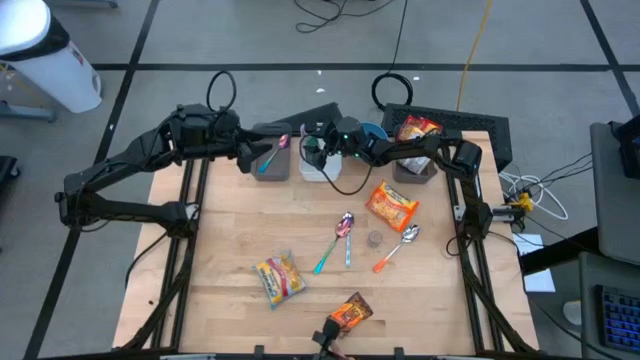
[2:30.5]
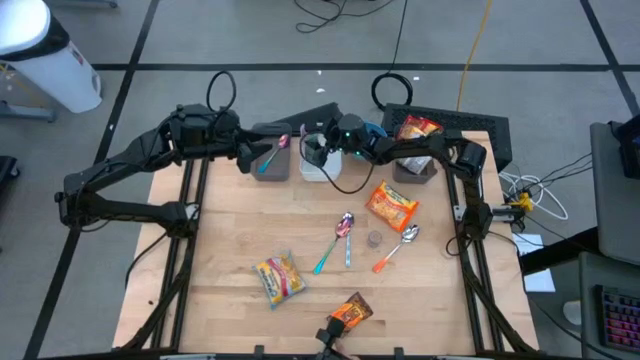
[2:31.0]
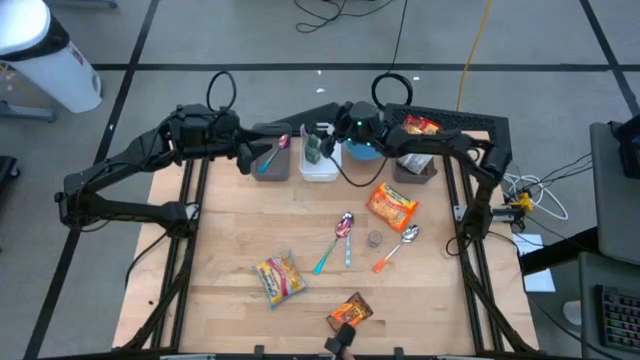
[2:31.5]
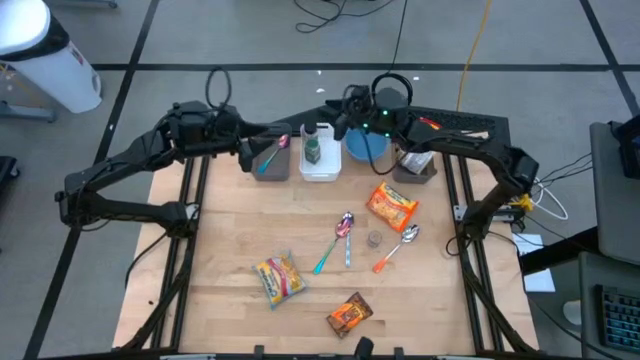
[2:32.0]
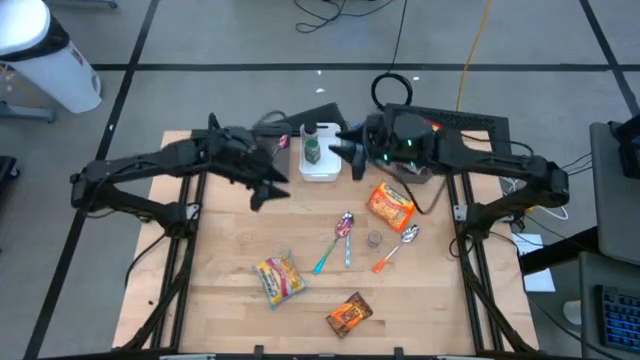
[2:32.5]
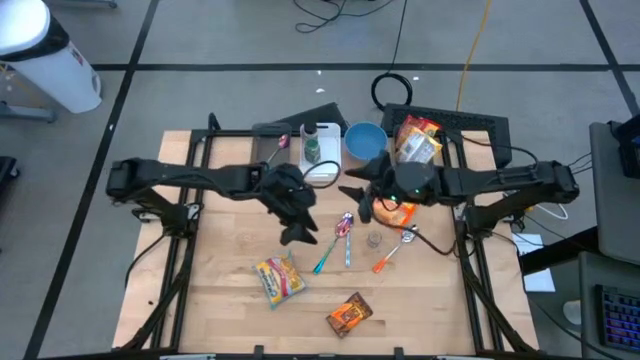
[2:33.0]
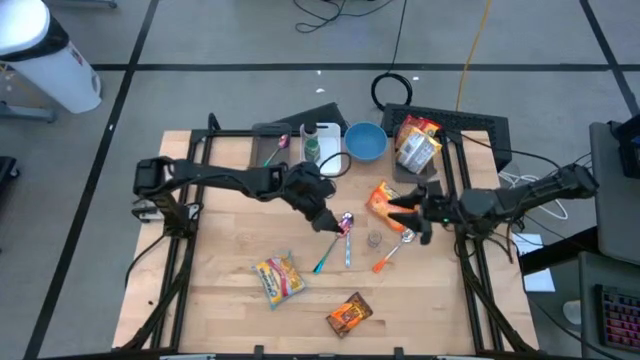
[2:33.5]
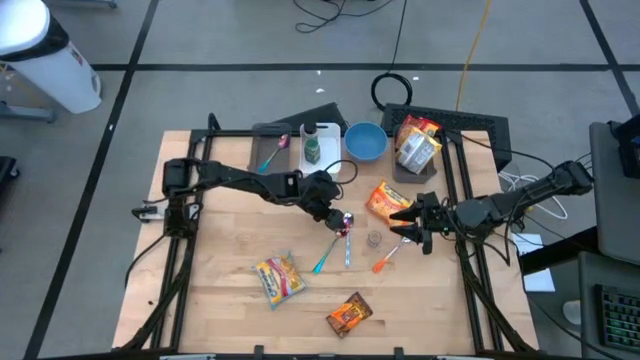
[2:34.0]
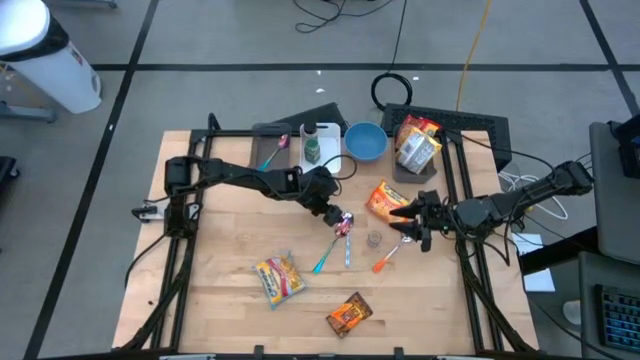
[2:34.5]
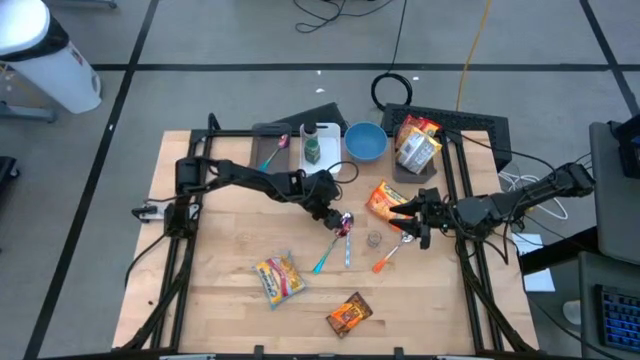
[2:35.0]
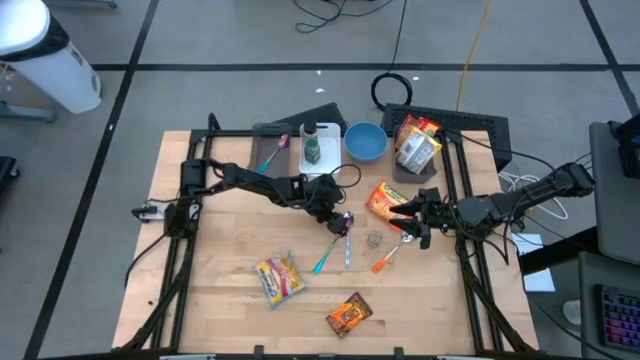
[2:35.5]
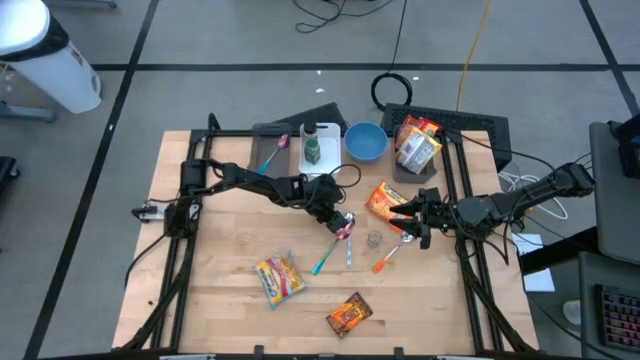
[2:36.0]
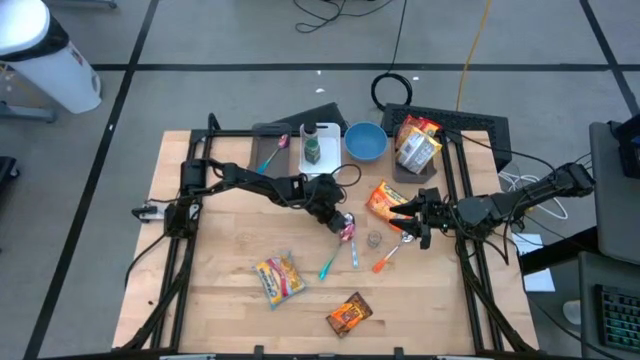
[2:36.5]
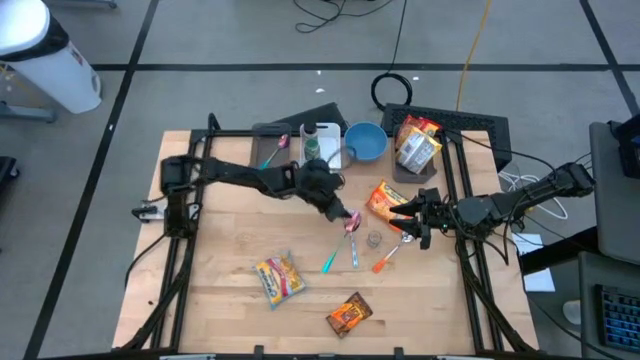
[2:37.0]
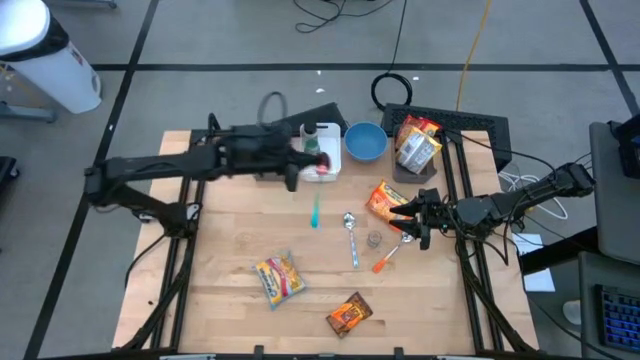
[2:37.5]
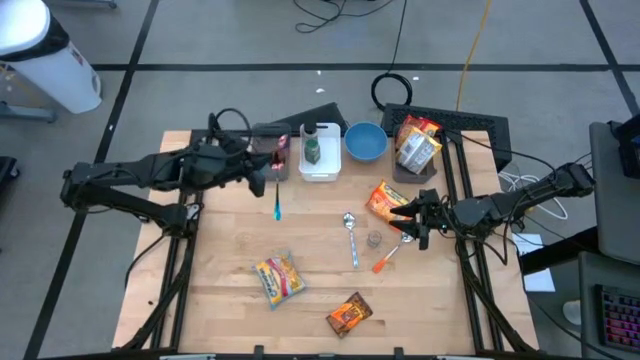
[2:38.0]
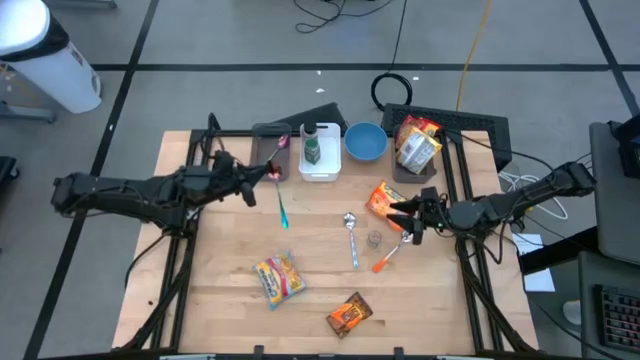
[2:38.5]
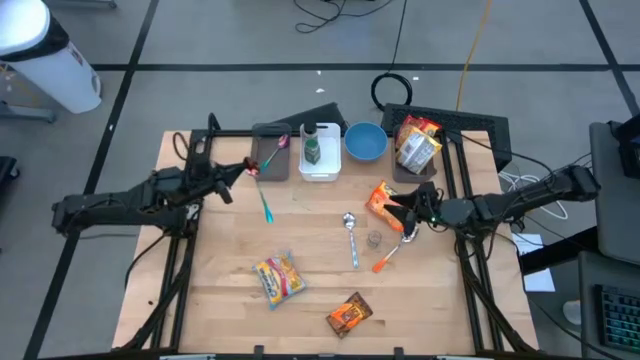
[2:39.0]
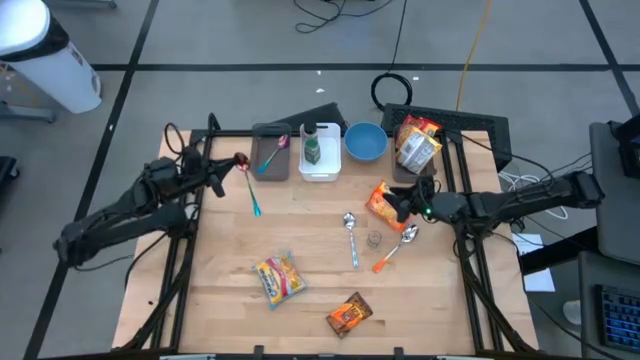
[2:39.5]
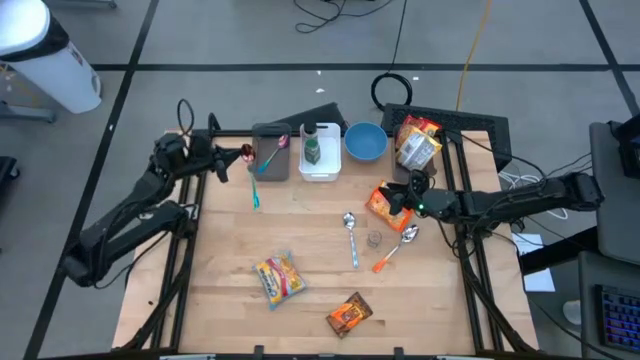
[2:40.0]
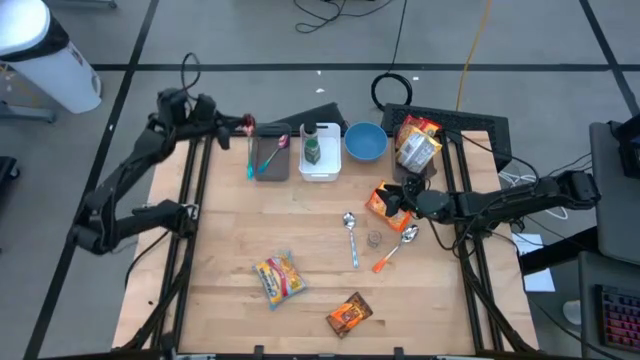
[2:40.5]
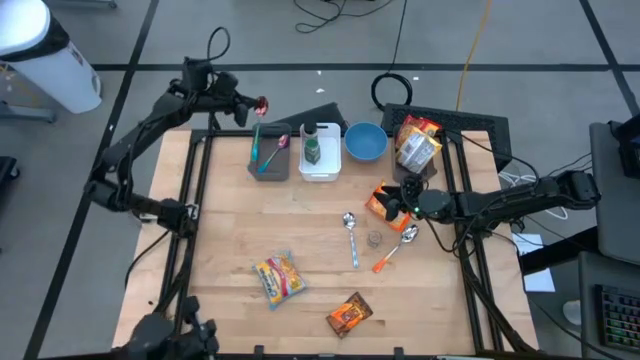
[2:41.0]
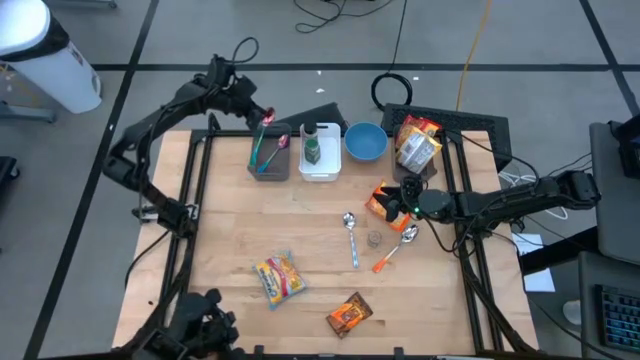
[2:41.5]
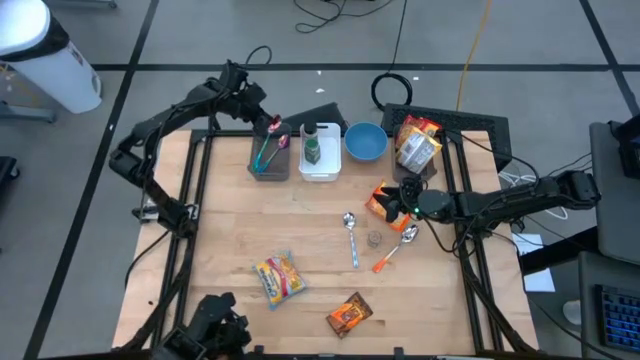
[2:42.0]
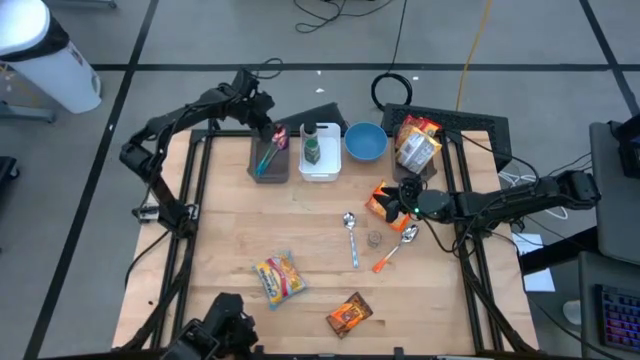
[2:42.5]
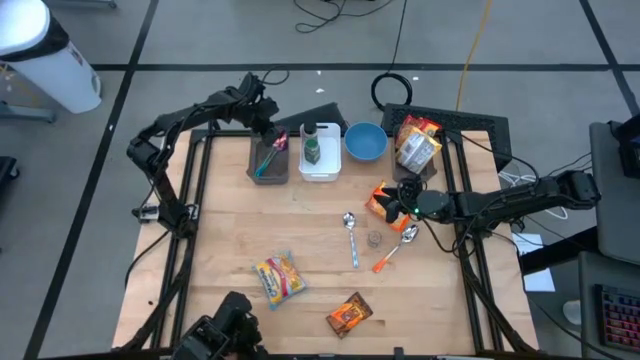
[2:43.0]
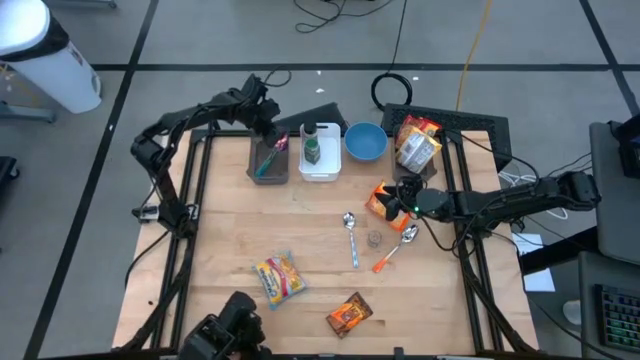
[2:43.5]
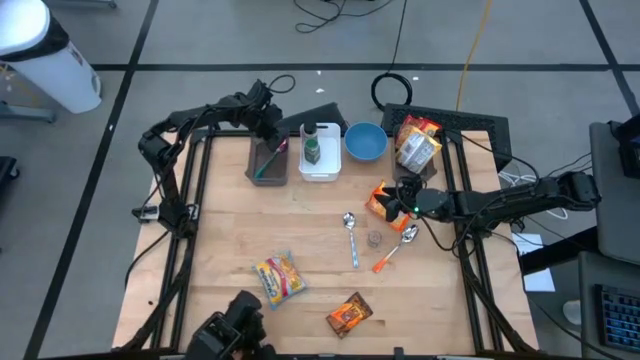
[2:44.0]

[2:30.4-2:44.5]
Task: Pick & Place Food Item
Put the blue spoon into the left black bin

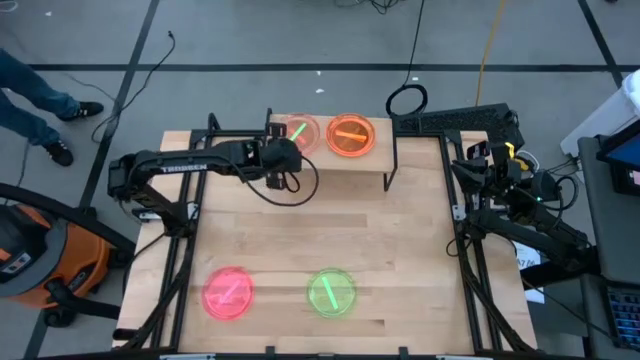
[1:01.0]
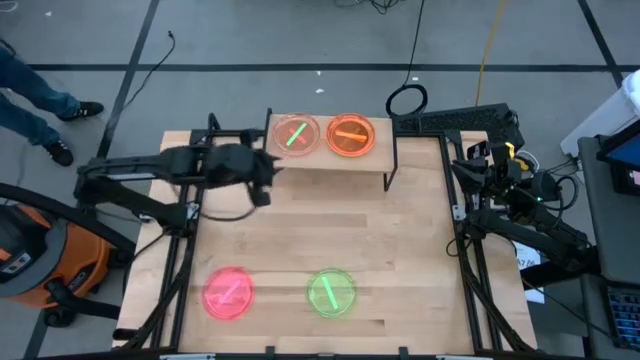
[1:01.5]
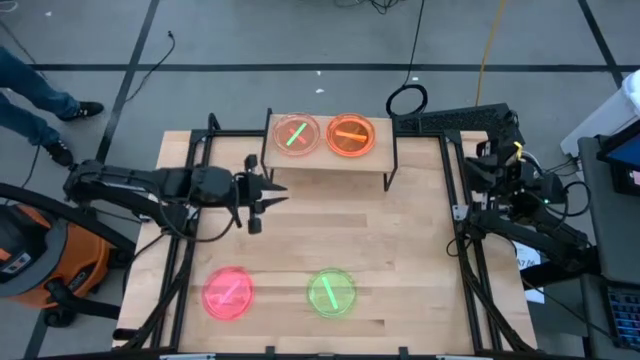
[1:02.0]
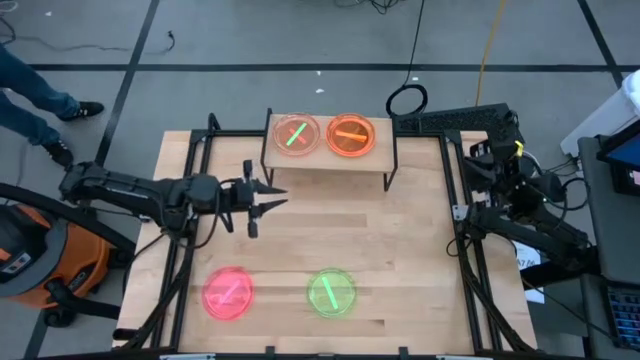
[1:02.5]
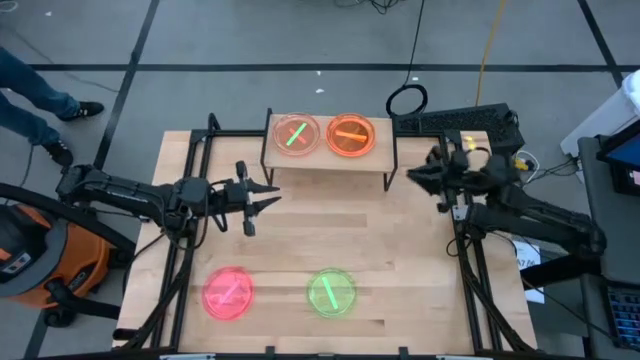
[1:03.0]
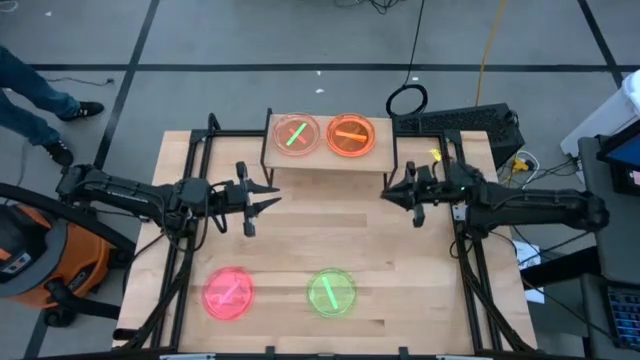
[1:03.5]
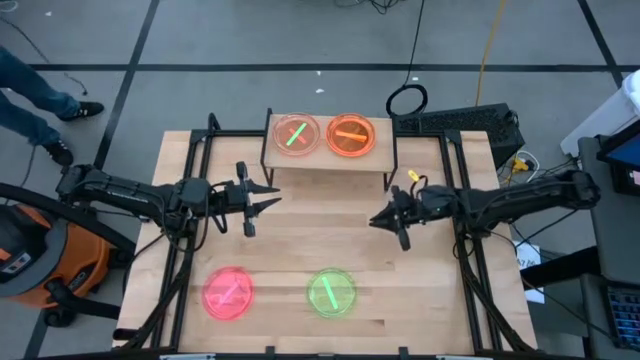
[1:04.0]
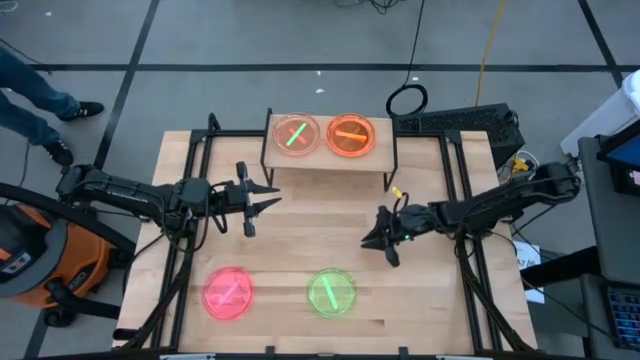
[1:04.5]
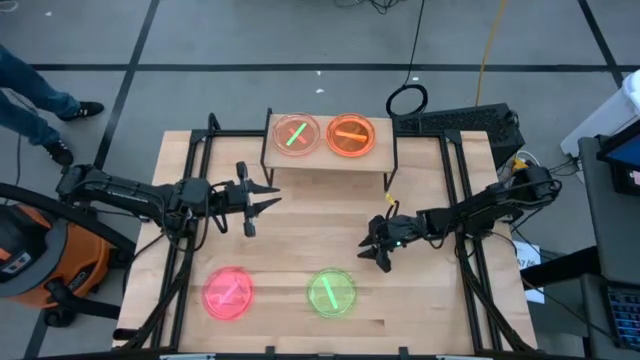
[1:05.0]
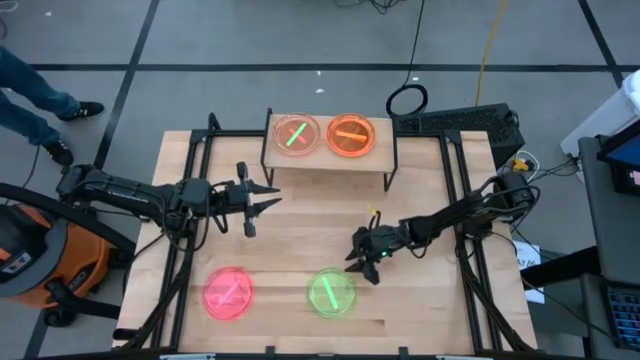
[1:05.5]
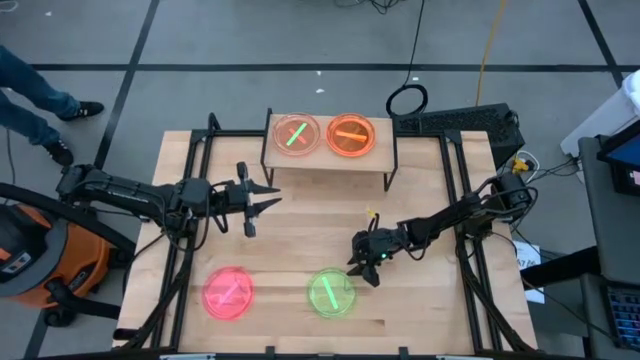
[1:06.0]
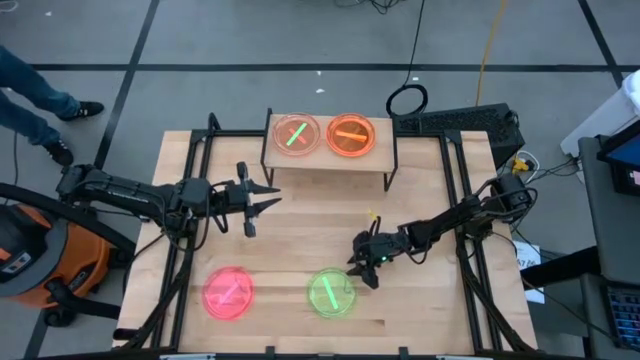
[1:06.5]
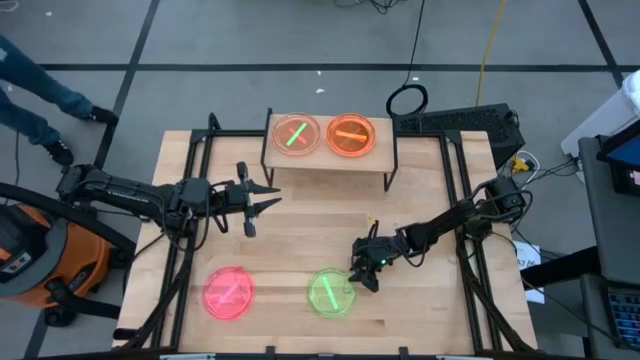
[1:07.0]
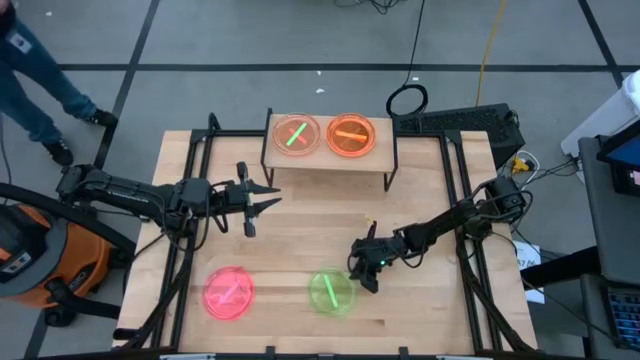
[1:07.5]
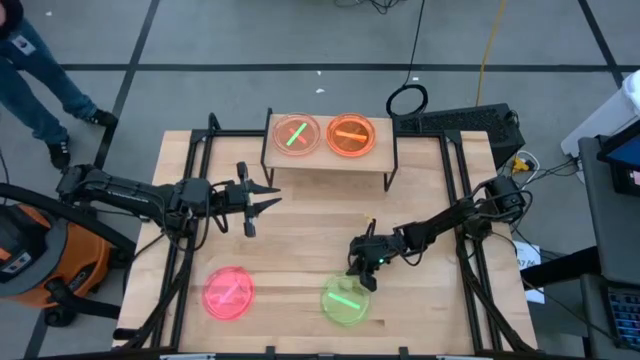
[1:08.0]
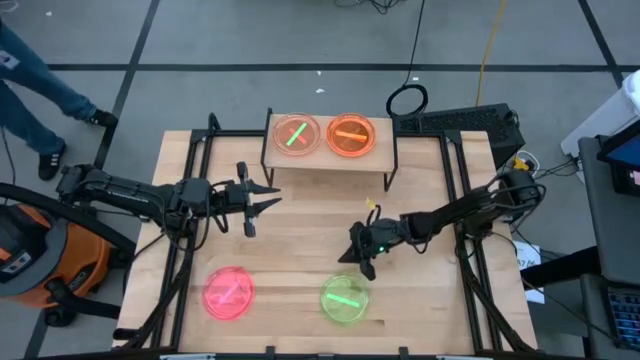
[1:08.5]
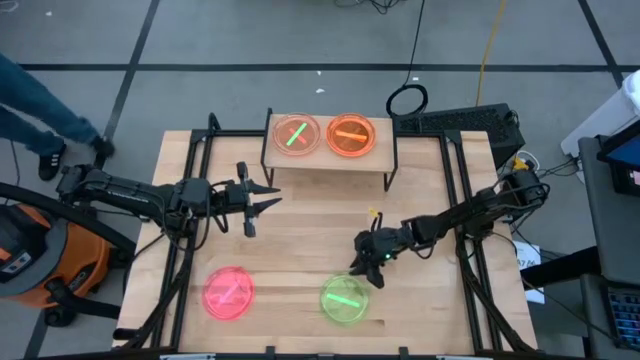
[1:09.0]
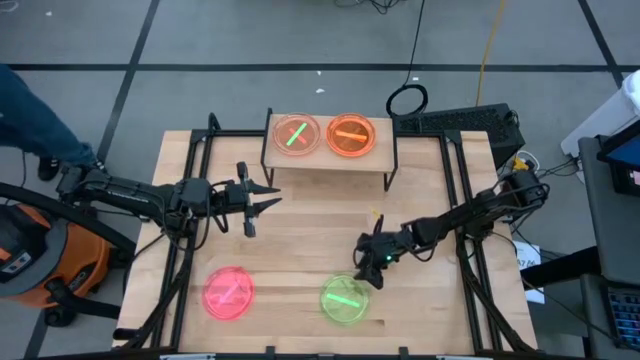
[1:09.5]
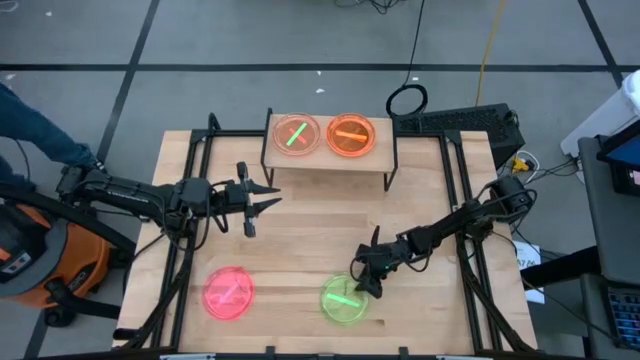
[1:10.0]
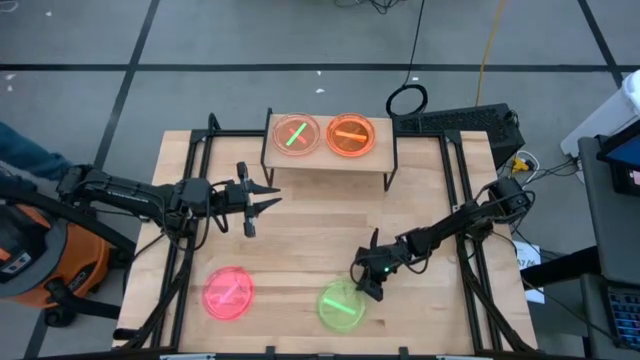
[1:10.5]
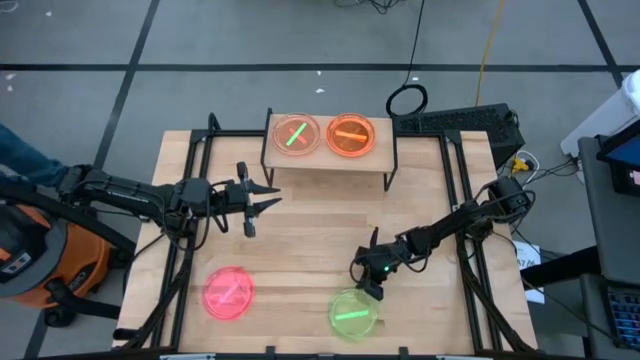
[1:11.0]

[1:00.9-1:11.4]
Task: Place and stack plates onto a shelf
Stack the green plate on top of the green plate on the shelf
